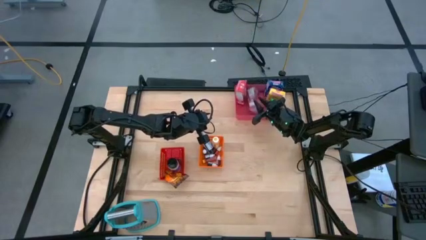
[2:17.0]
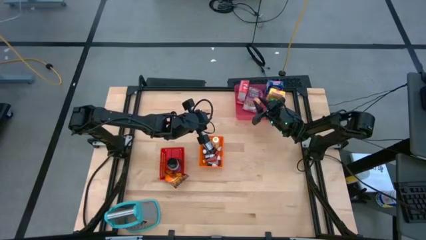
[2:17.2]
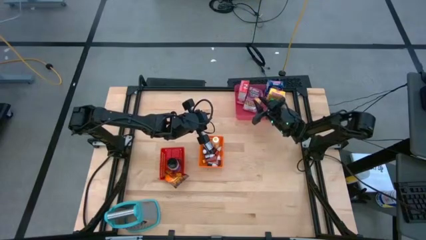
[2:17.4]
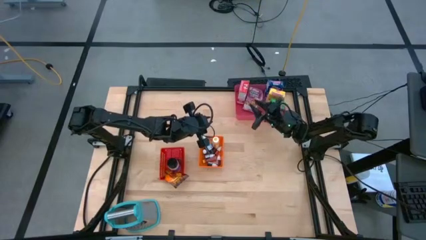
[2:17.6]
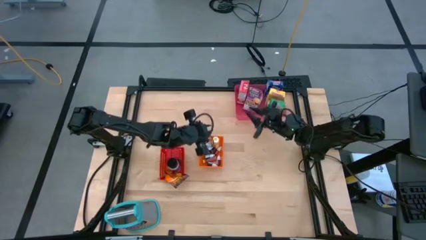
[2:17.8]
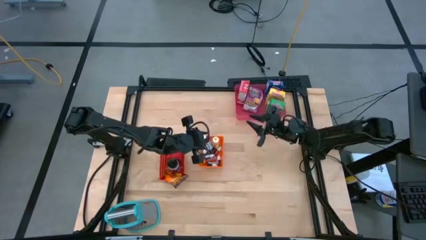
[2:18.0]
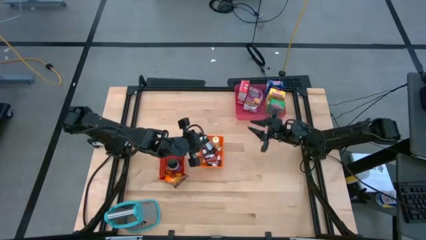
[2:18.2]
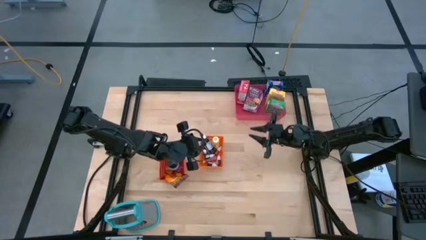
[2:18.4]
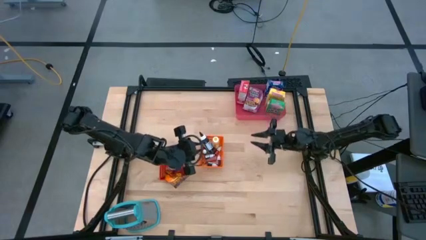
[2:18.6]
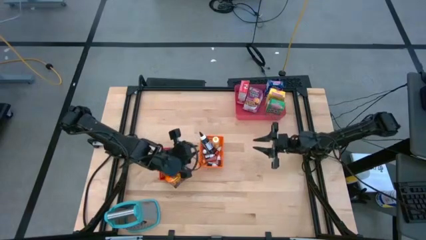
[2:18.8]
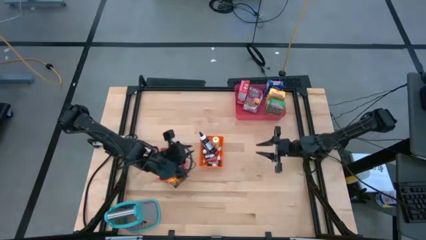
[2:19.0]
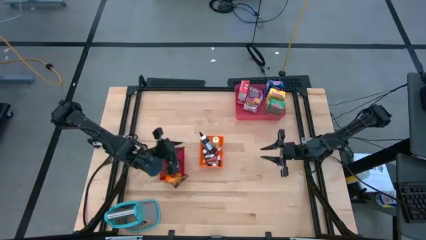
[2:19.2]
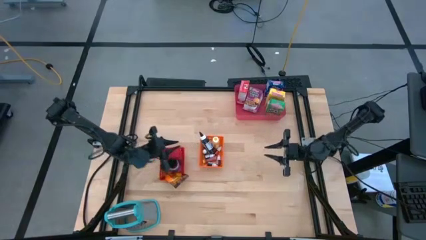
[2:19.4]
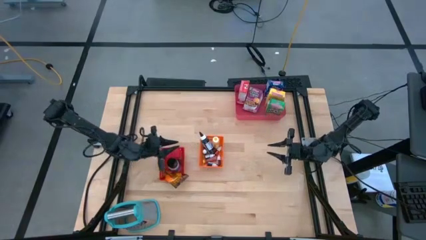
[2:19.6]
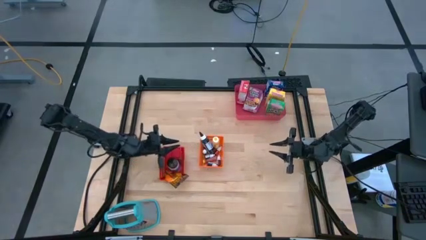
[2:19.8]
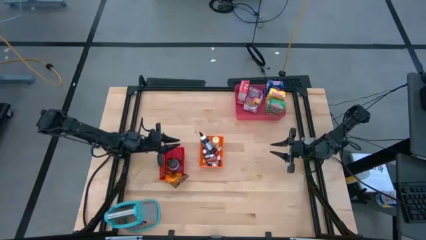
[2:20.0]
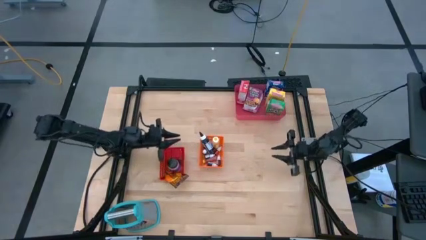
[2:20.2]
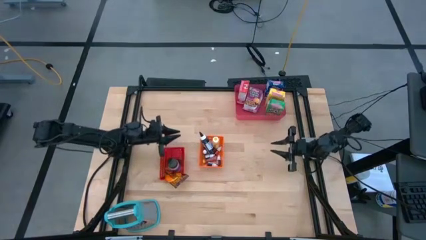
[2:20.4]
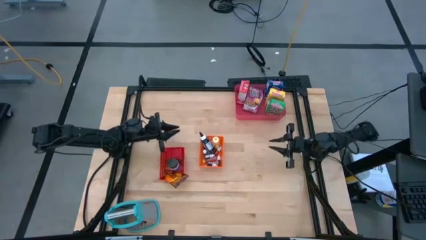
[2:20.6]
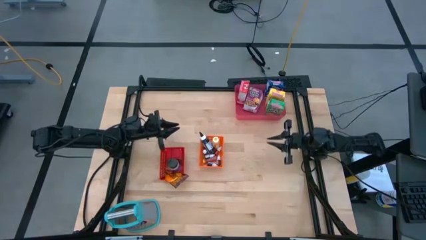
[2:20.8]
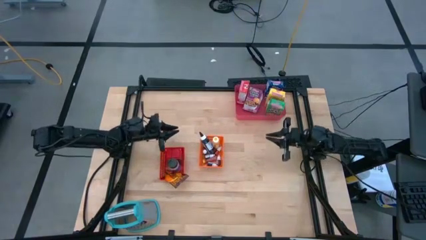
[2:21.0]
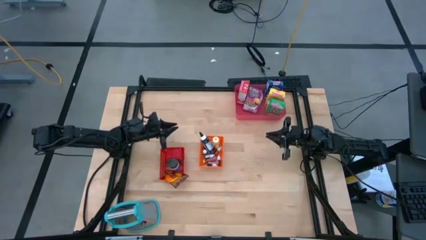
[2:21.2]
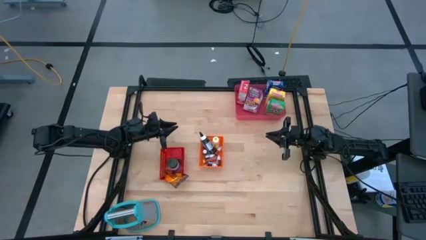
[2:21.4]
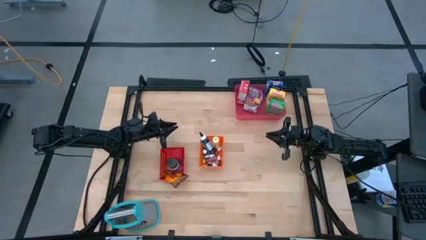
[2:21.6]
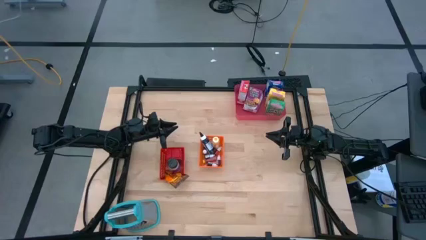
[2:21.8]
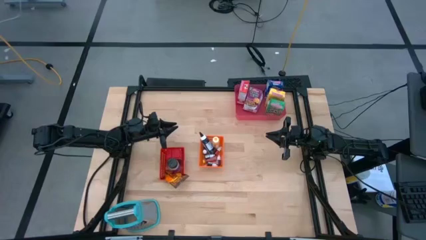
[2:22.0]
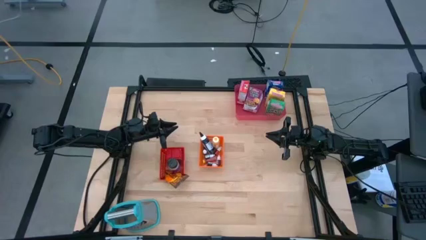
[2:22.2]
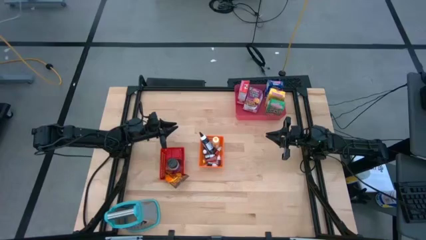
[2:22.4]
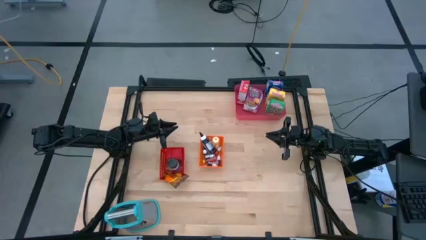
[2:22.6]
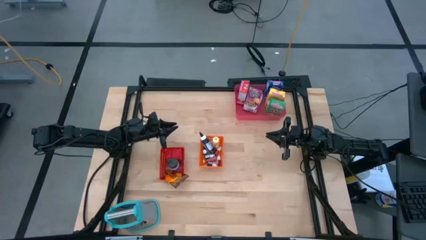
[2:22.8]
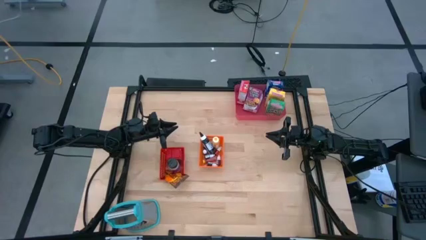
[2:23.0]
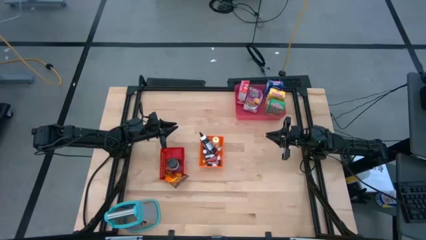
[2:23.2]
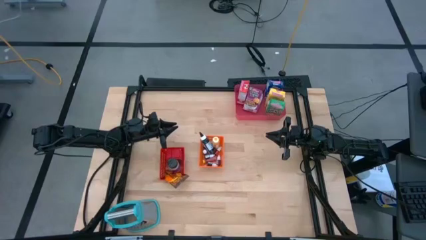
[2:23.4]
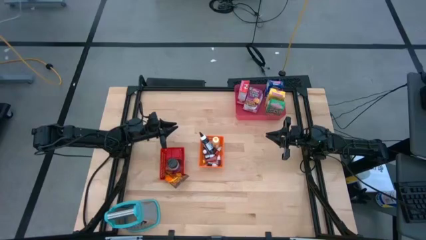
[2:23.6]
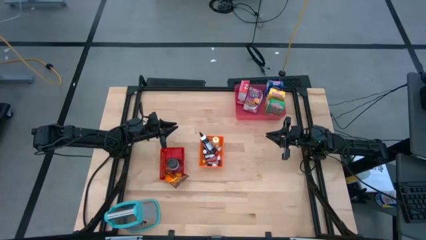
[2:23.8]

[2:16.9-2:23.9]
Task: Pick & Place Kitchen Items
Return to Home Position

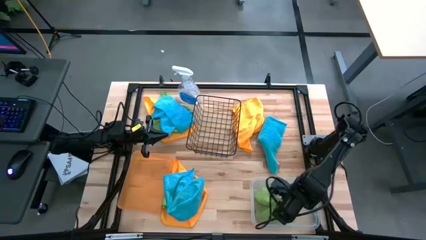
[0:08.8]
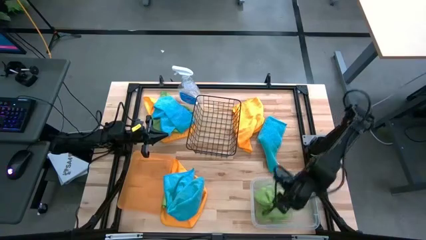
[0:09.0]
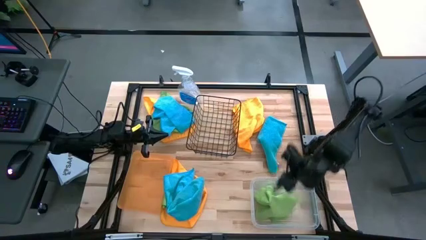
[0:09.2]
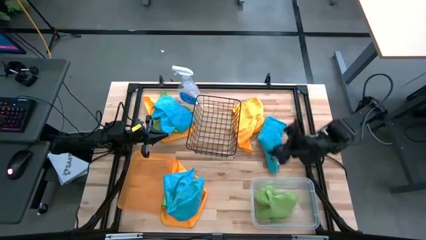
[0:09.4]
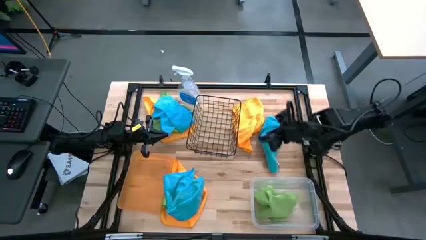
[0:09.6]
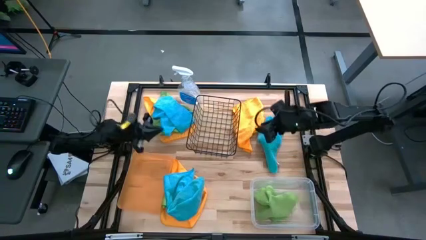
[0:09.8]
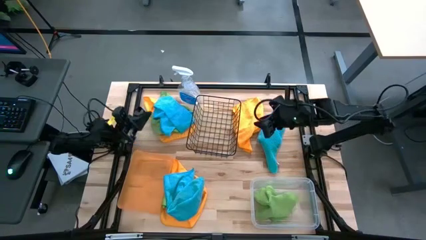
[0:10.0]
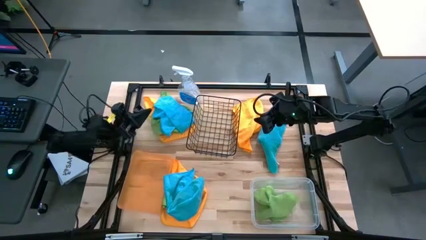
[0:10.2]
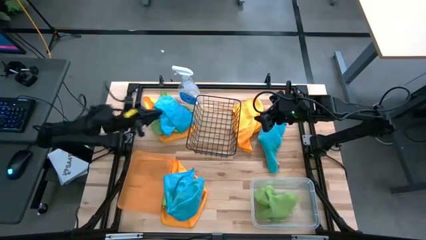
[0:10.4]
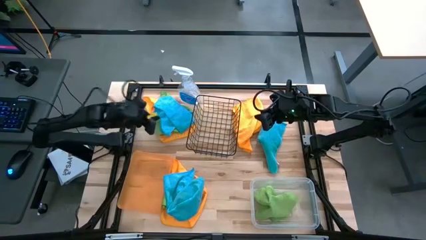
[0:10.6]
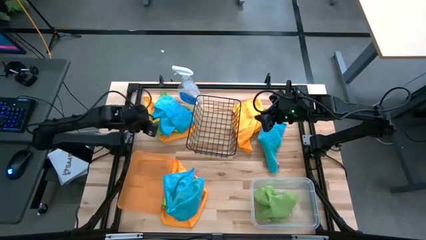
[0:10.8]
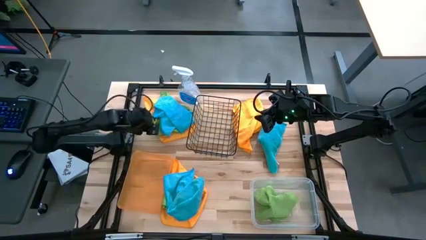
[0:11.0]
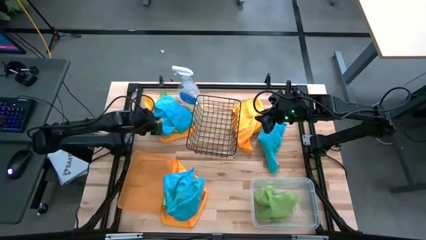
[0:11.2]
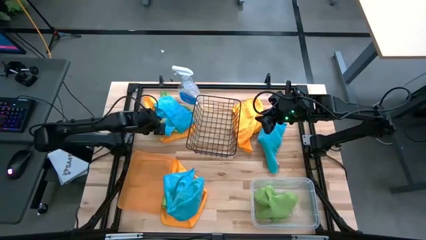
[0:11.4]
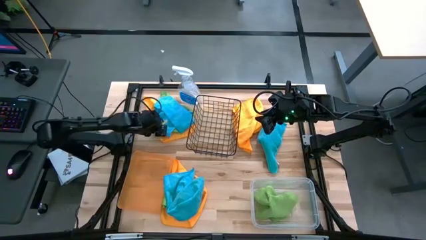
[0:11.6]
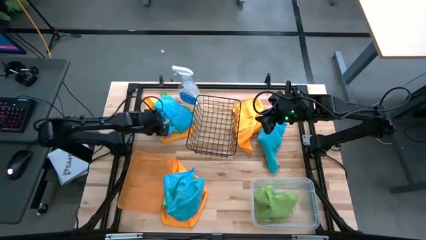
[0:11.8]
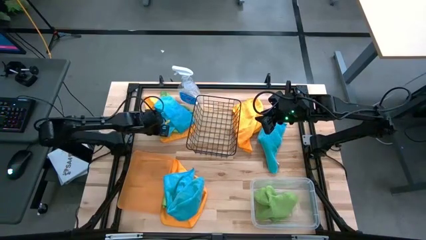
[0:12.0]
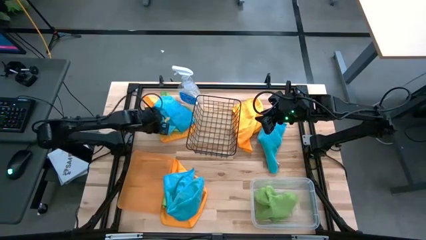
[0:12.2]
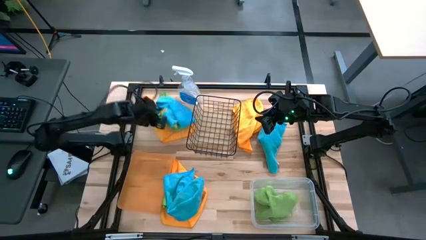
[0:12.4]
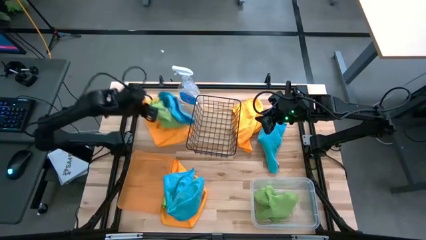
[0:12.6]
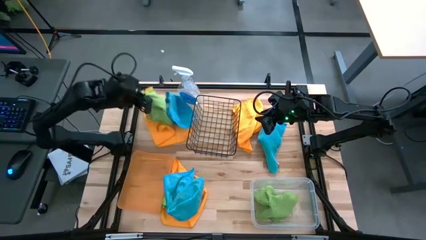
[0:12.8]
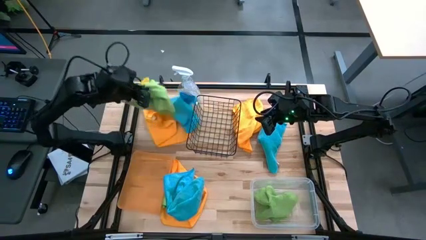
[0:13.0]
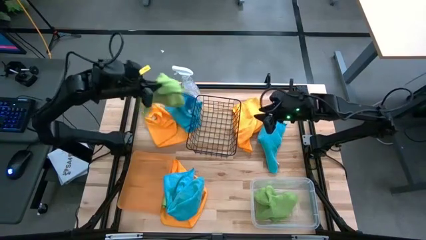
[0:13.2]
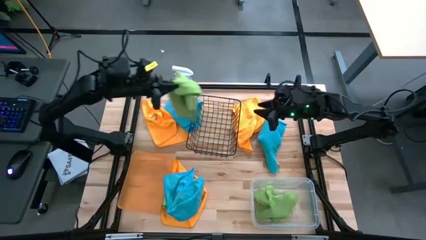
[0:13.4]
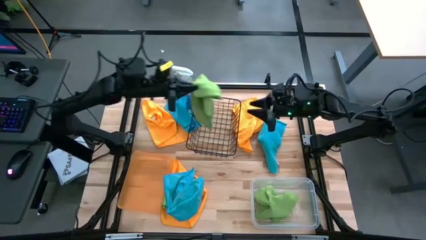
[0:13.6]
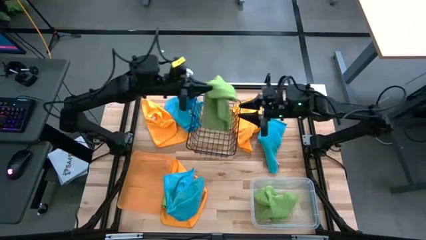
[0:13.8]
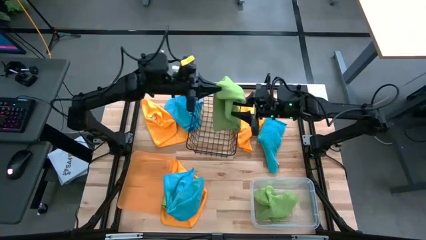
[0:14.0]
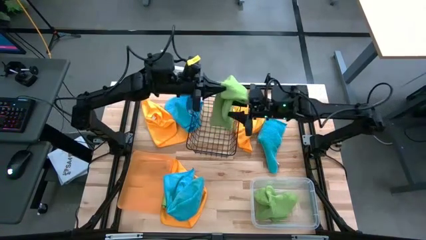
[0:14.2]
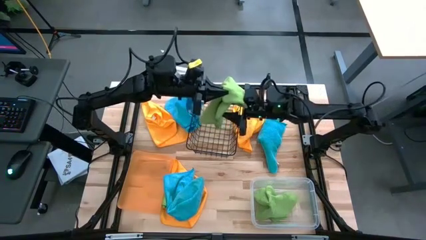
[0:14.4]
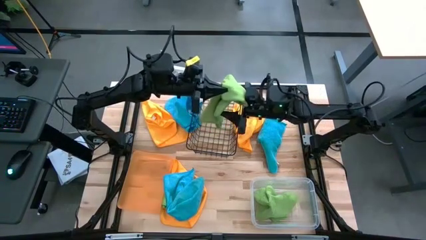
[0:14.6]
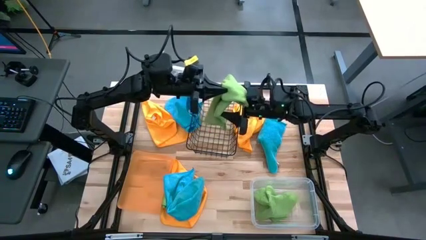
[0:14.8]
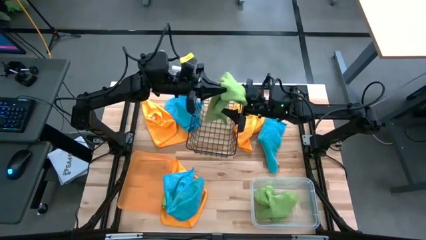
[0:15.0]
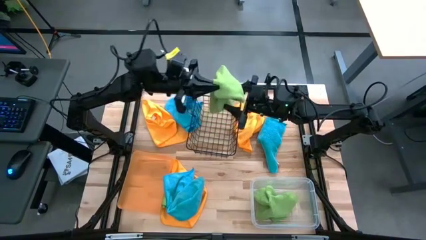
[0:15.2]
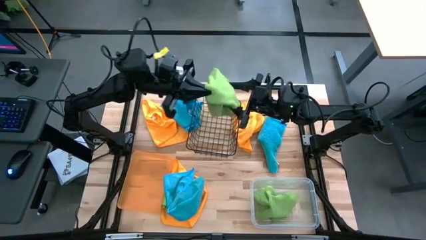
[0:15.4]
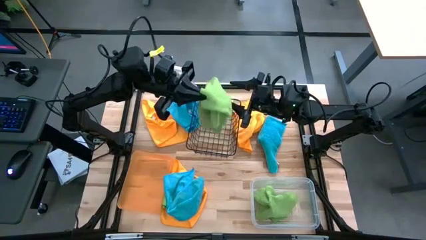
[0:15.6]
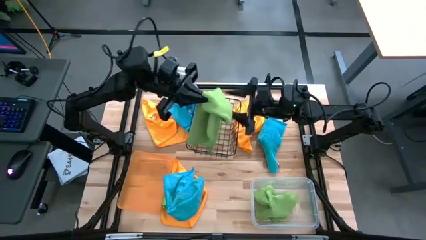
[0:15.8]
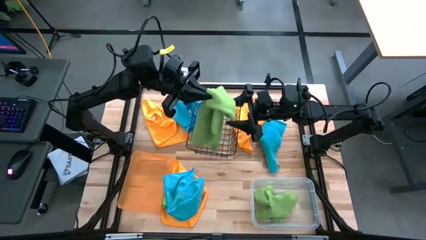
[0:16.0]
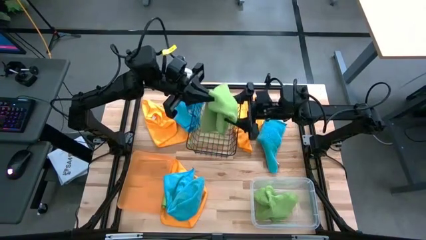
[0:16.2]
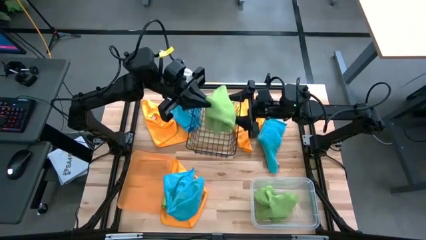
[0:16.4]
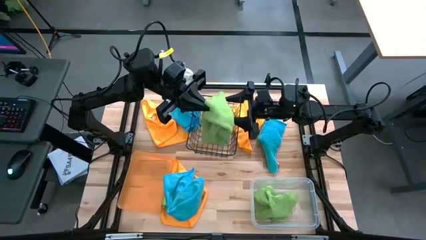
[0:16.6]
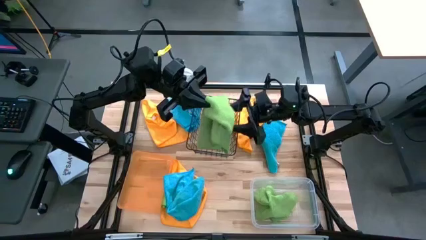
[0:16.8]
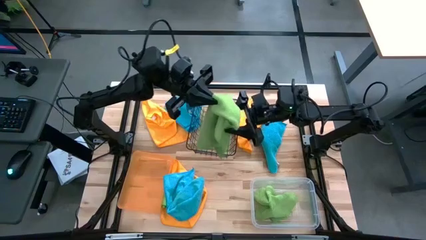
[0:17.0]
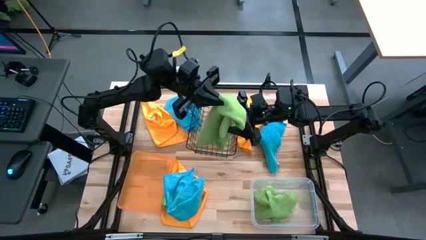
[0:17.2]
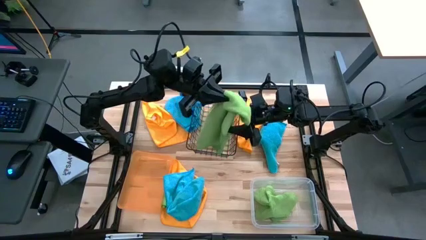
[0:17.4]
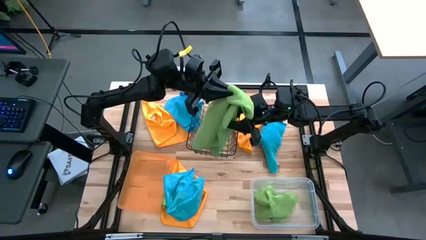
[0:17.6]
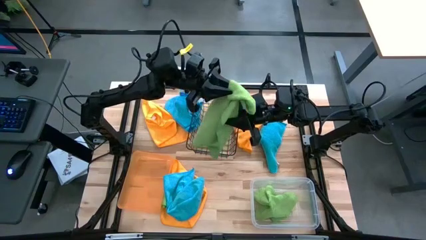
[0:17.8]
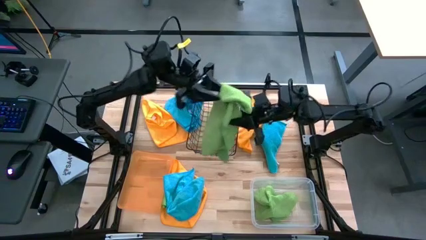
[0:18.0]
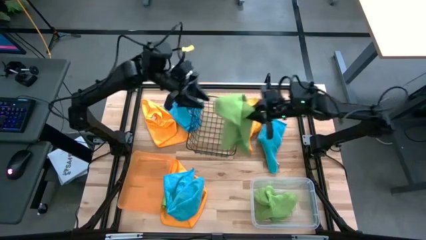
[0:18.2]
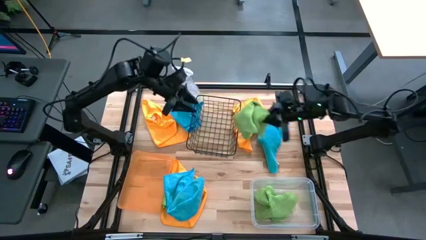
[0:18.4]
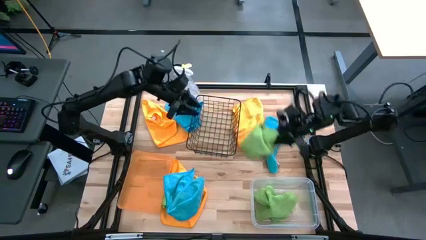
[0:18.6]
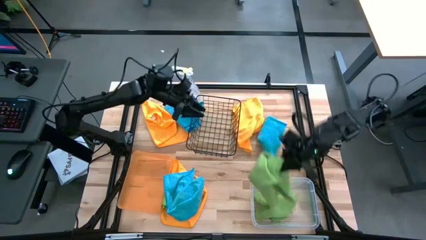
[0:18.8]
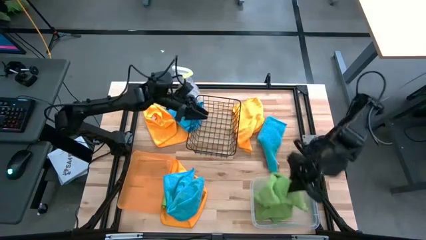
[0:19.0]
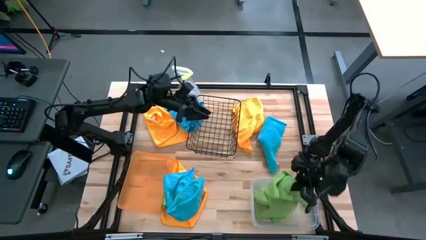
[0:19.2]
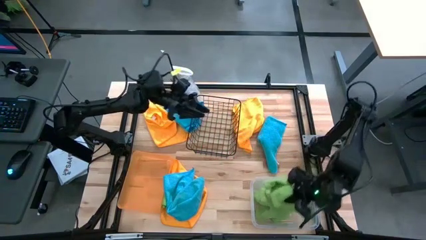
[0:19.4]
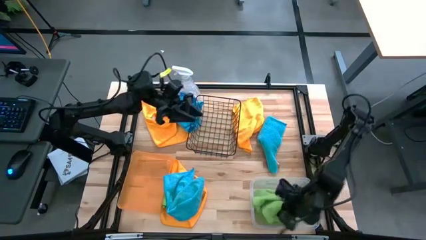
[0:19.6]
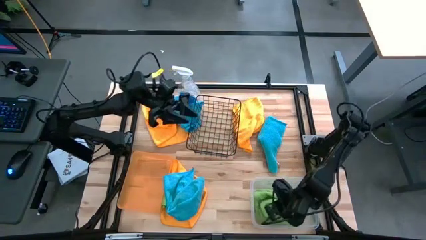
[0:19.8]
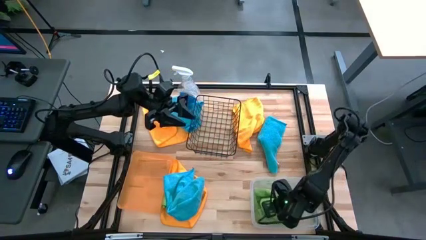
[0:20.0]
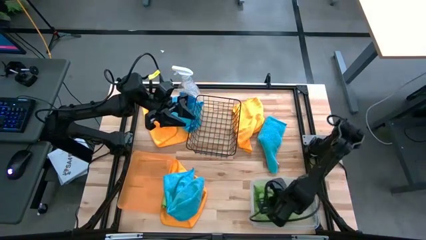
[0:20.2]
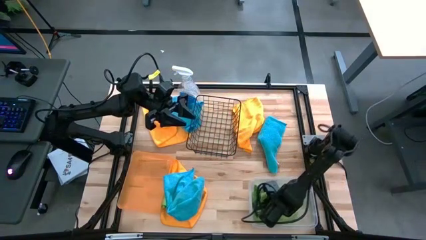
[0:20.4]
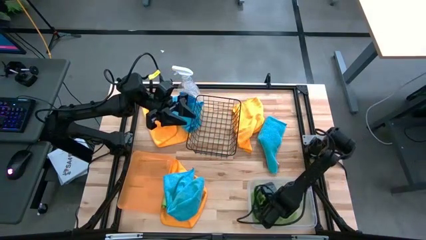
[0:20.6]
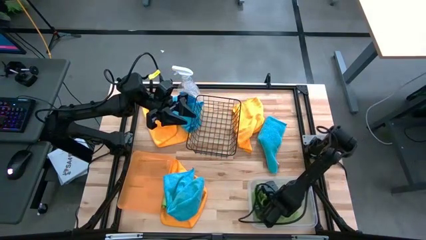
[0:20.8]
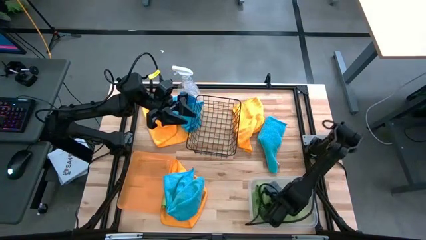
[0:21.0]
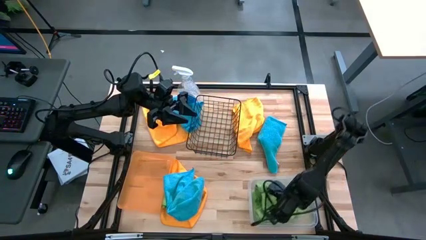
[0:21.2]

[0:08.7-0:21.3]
Task: Sort microfiber towel by color & place in baskets
Put the top green microfiber towel into the transparent bin
